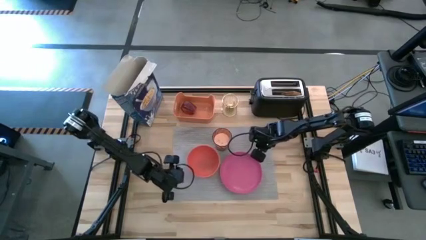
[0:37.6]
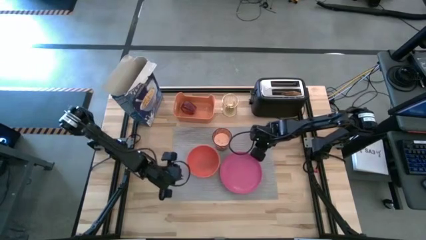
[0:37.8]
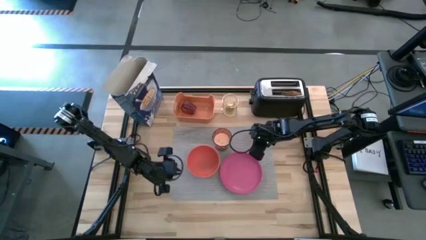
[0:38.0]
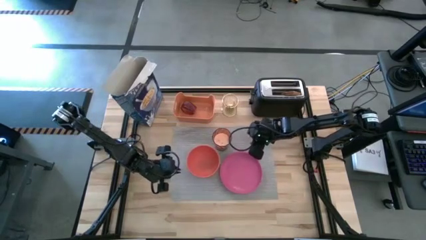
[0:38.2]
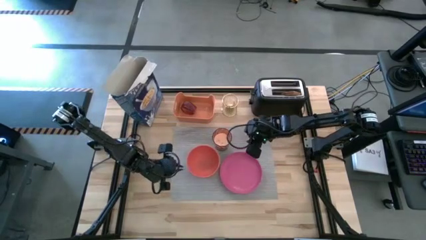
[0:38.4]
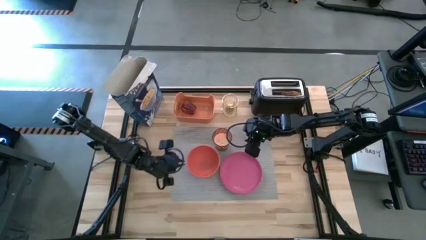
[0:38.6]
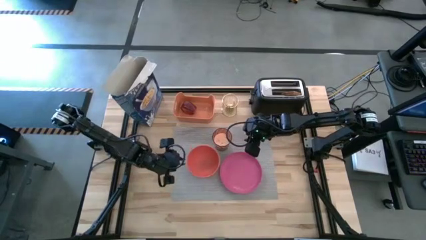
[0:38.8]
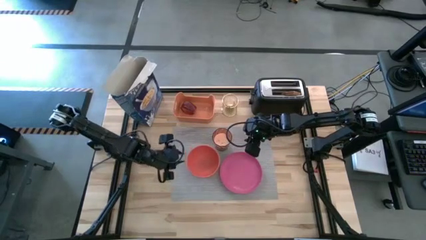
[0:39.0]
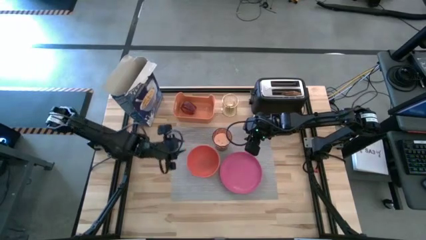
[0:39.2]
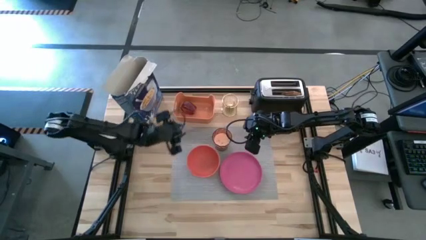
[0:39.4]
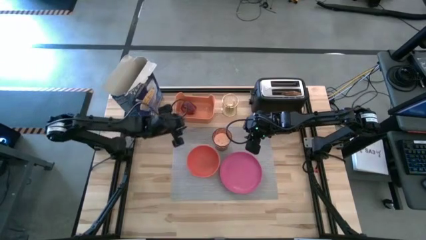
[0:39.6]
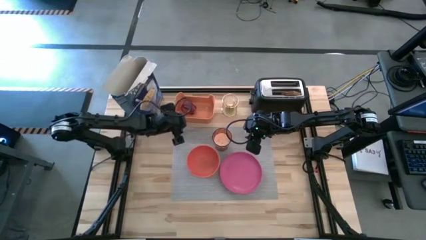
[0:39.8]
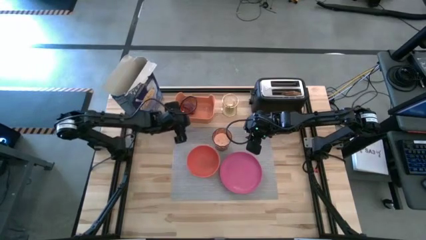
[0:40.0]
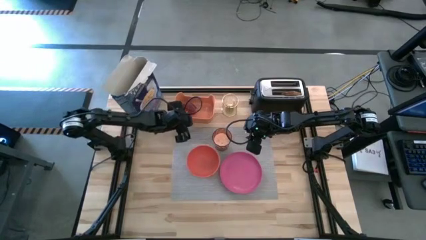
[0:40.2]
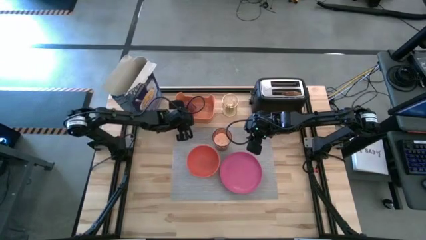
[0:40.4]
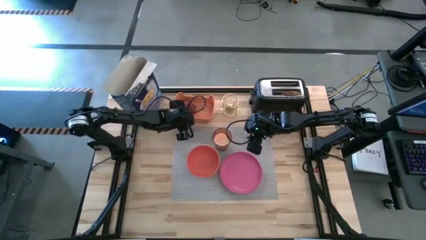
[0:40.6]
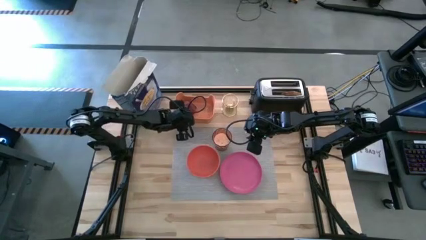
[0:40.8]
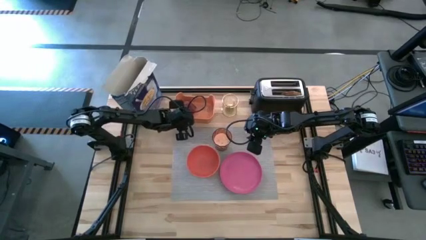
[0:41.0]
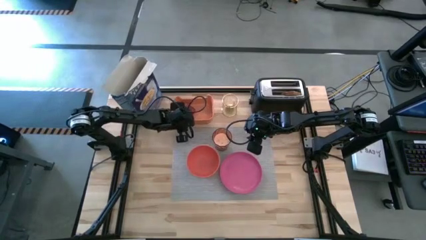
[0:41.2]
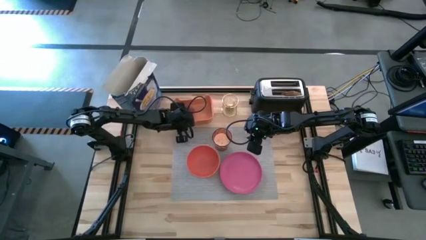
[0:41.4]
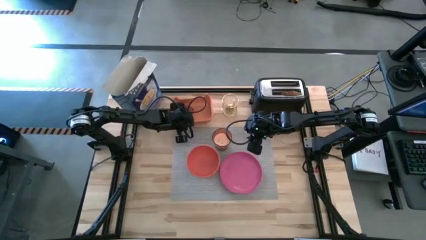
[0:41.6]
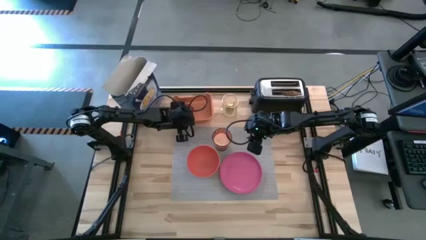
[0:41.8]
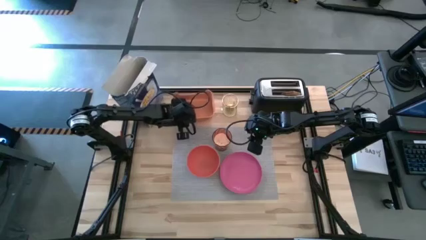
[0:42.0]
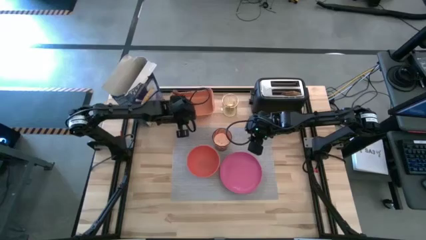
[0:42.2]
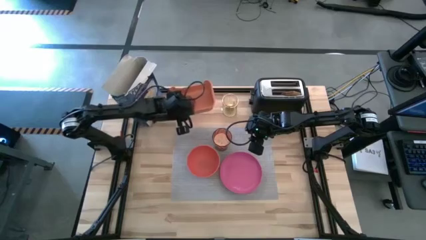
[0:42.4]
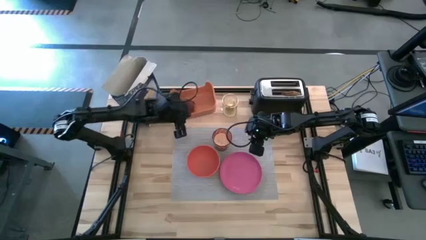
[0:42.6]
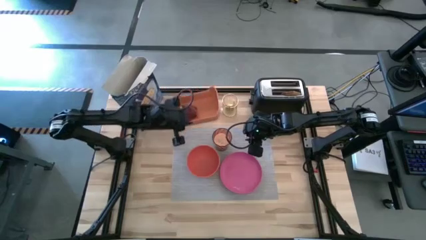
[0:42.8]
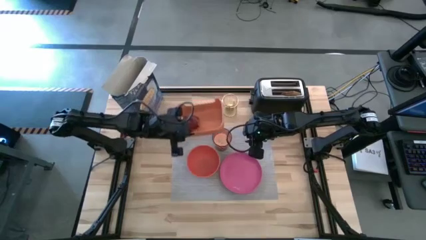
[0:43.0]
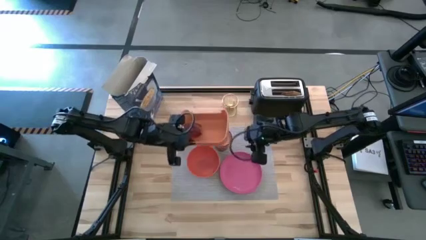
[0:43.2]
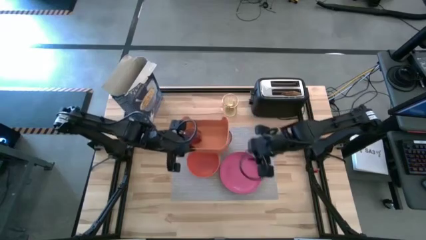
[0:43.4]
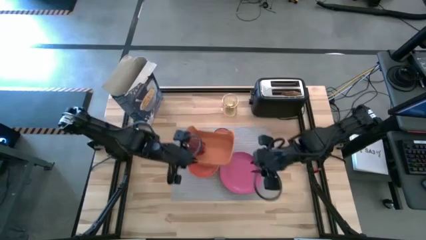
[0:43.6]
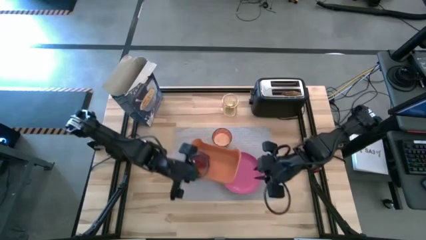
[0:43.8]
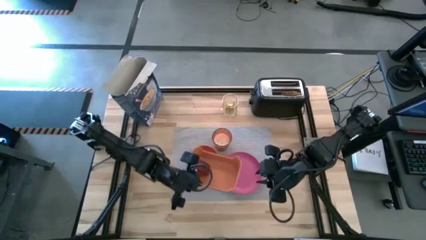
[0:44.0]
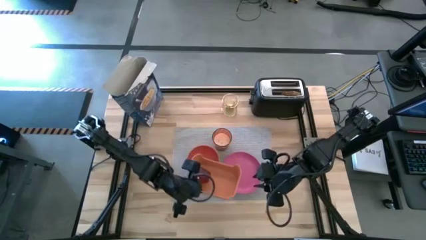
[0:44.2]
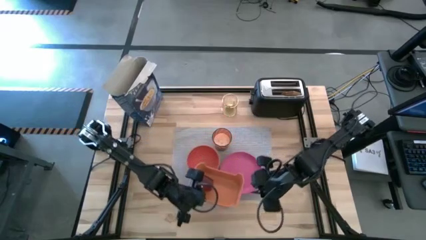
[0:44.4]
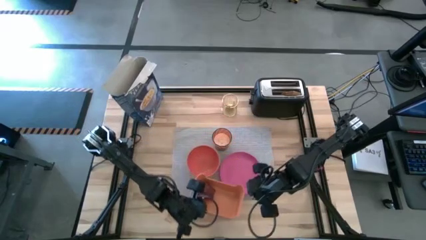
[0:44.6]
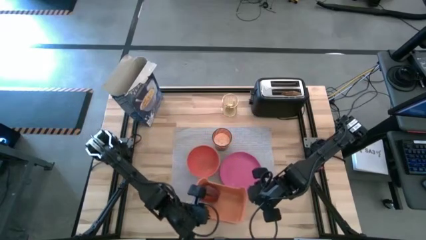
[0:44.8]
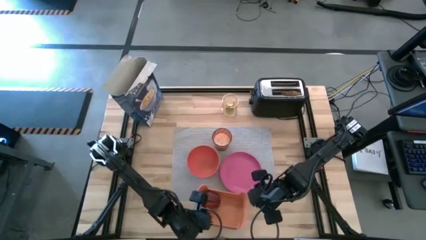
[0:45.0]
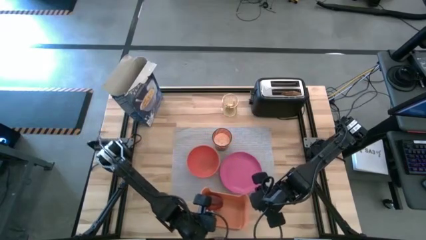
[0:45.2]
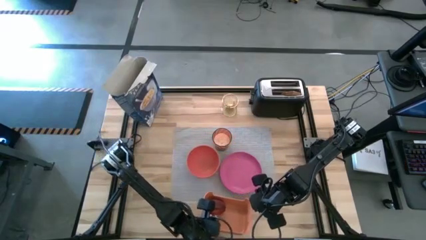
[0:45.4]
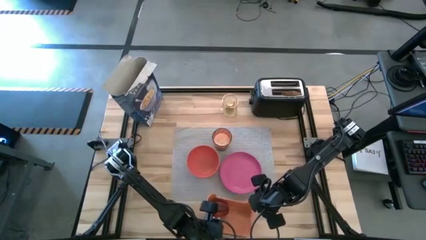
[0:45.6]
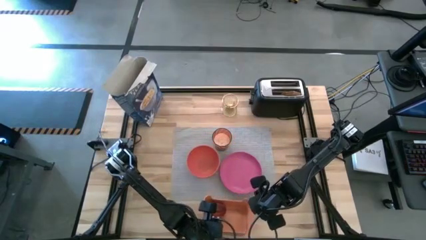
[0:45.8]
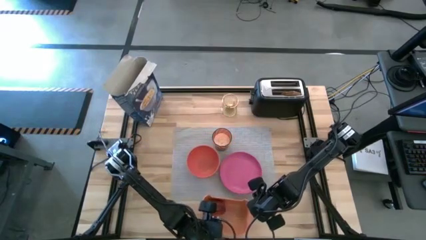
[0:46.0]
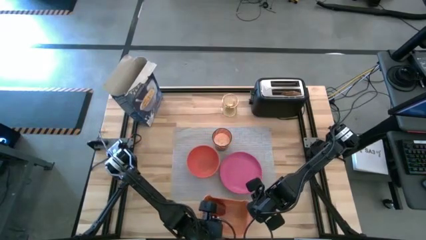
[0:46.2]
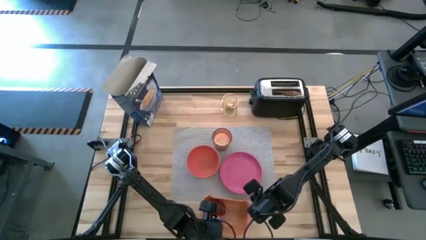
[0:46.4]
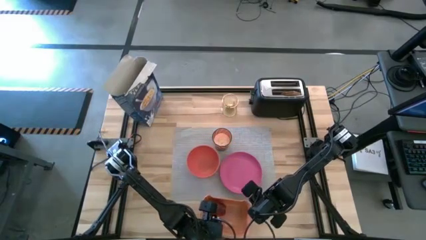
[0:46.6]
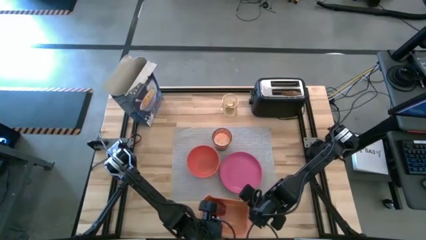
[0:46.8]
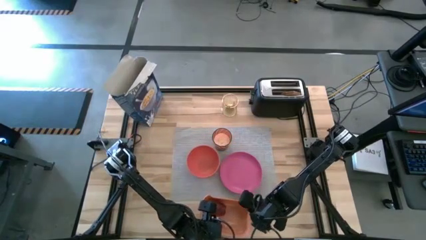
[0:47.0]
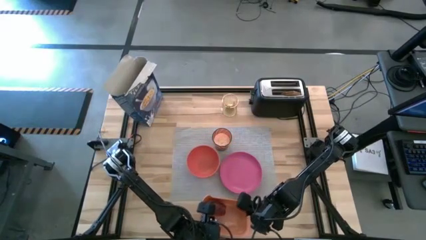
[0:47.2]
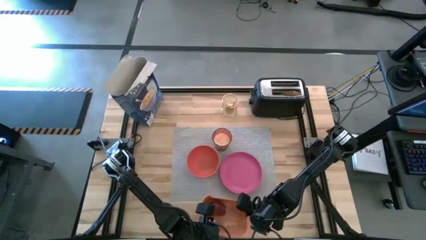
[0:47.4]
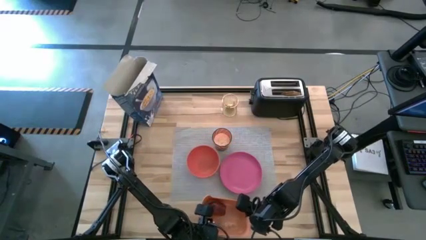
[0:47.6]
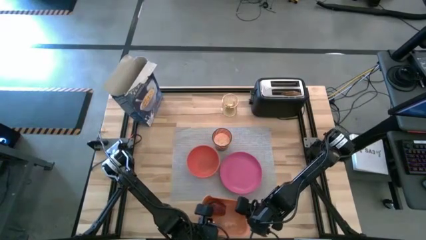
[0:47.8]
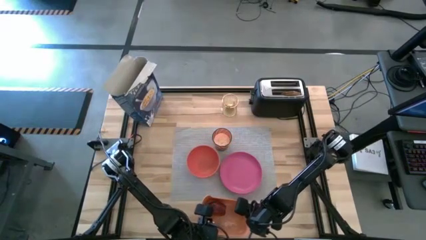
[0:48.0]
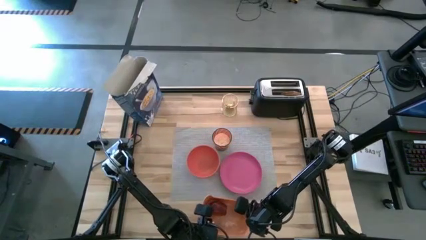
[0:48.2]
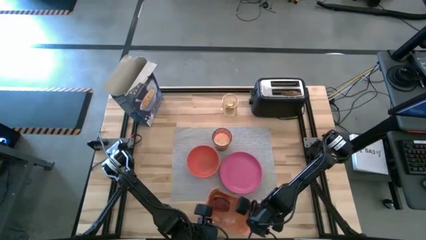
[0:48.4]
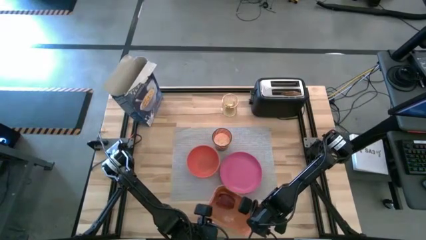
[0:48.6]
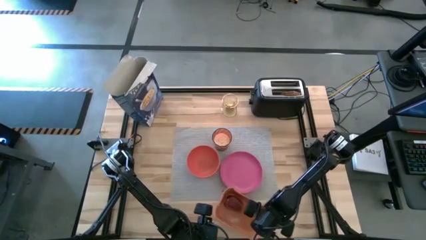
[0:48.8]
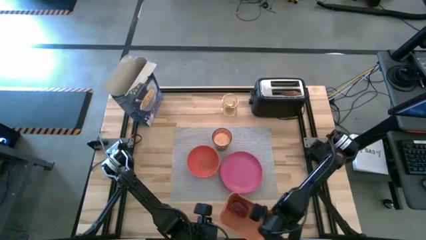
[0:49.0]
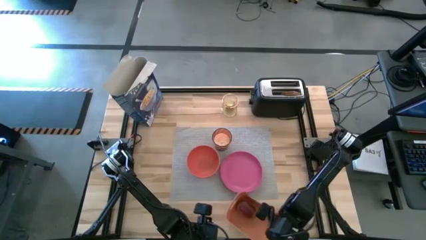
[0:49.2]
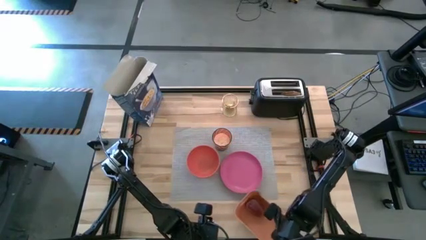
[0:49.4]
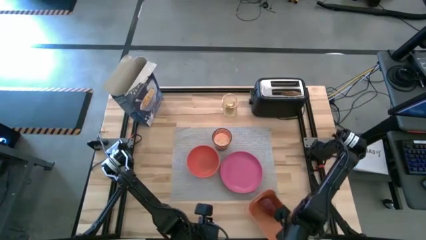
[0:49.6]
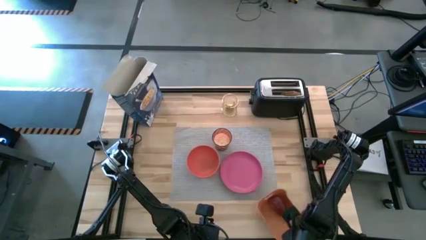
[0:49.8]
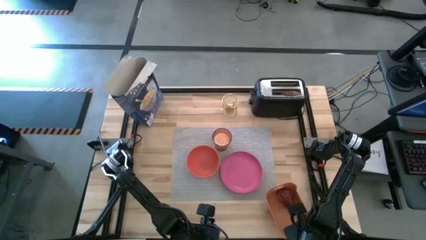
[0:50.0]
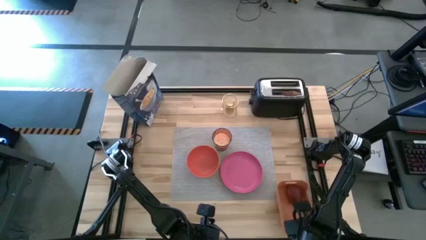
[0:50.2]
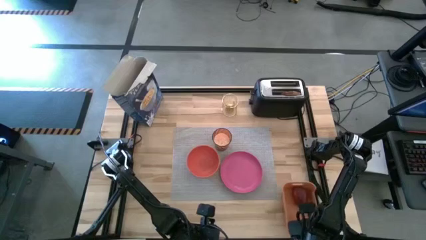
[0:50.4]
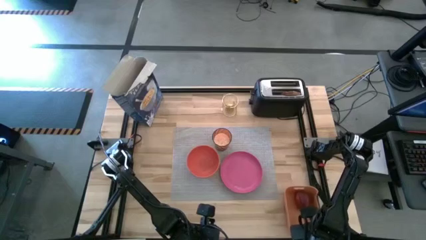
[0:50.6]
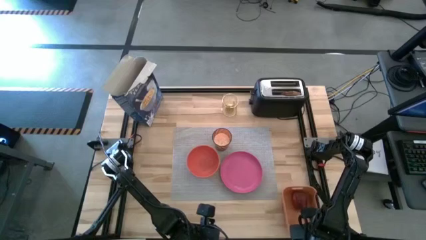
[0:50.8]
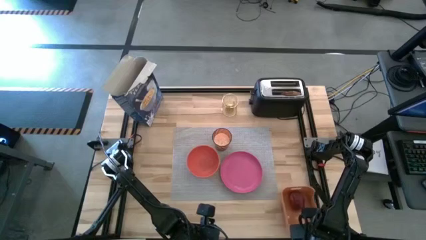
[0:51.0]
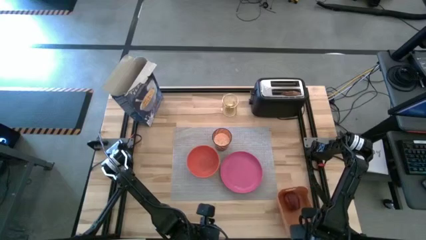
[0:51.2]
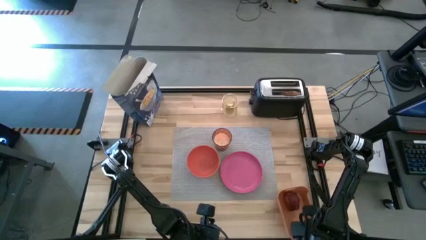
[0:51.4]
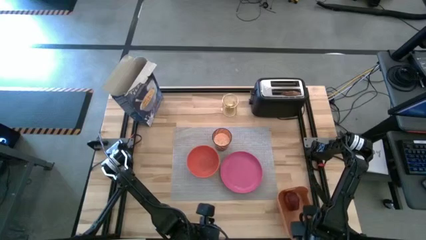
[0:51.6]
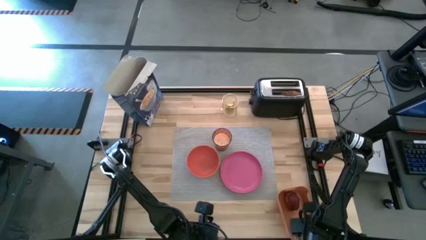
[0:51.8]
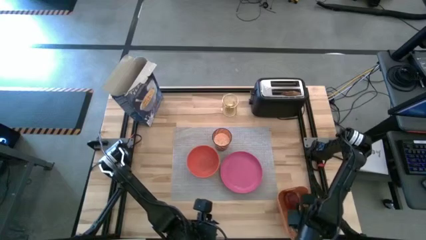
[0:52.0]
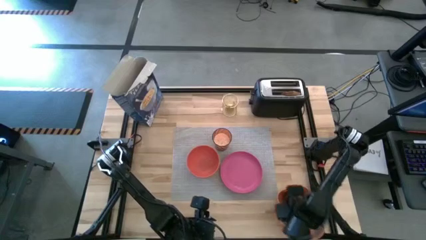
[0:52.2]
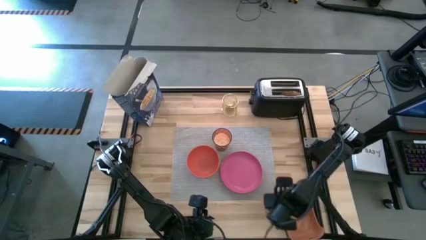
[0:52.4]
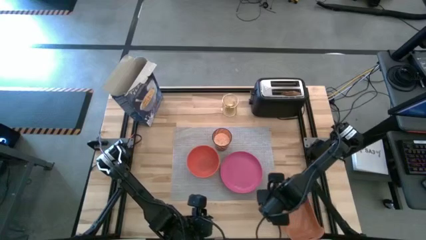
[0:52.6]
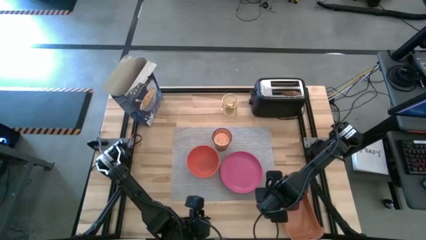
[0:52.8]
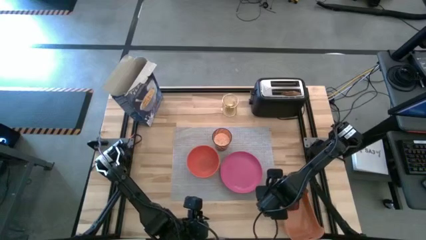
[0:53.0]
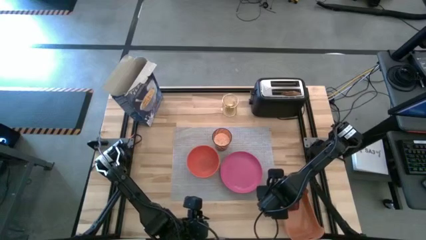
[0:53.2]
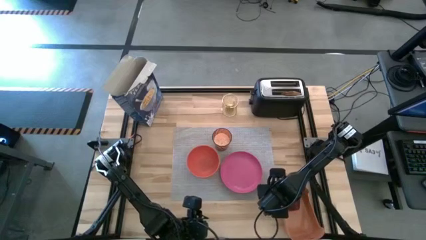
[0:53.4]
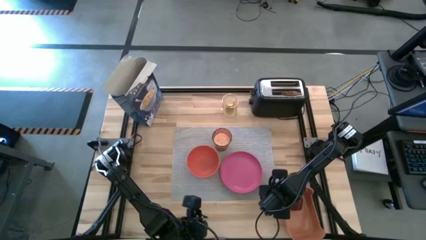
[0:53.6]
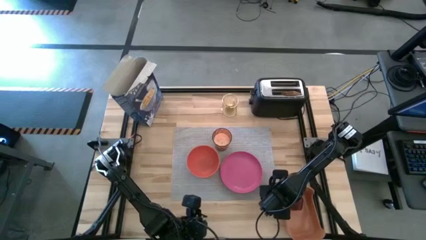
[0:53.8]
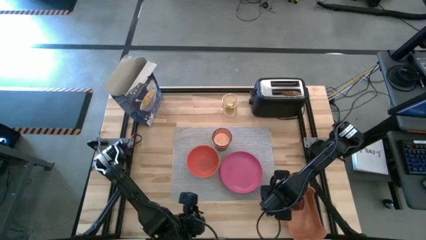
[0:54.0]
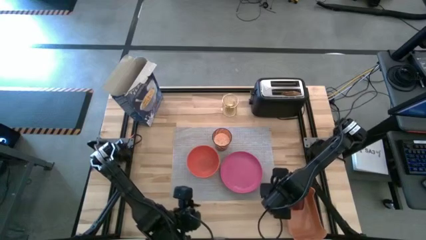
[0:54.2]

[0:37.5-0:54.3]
Task: Arrange a breakfast setting
Move the orange bin to the bottom right of the table
